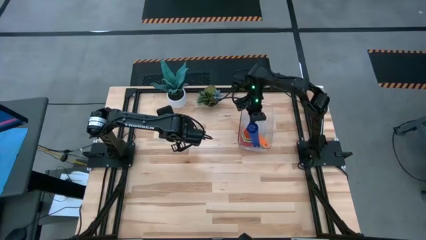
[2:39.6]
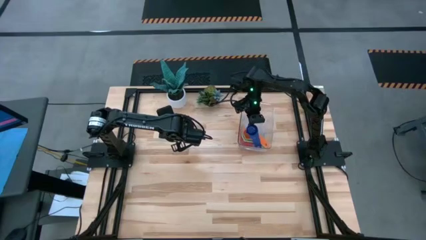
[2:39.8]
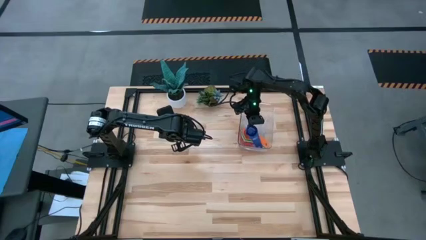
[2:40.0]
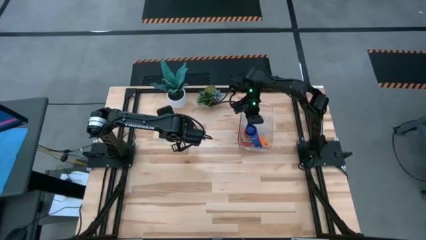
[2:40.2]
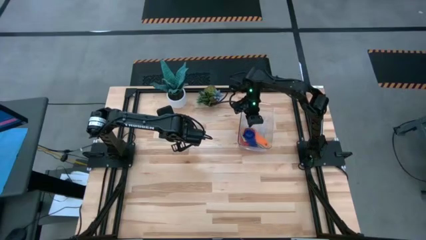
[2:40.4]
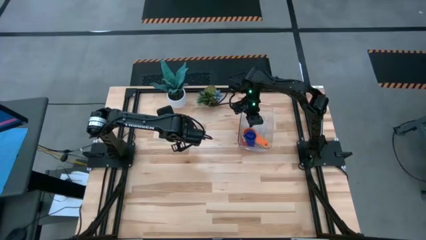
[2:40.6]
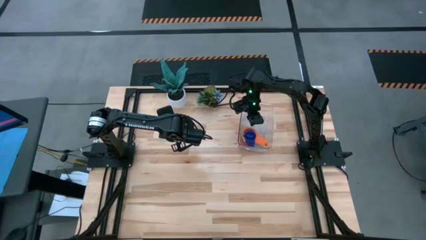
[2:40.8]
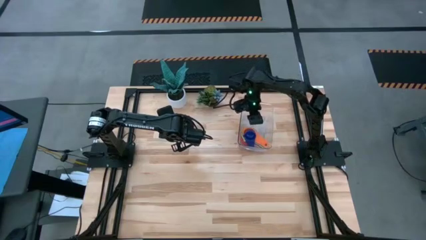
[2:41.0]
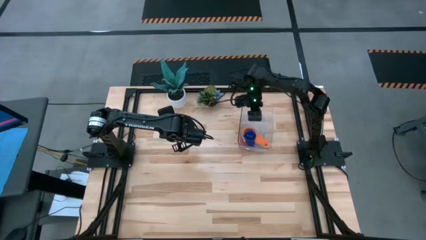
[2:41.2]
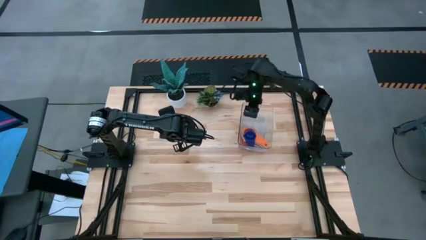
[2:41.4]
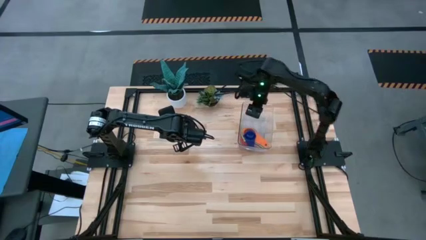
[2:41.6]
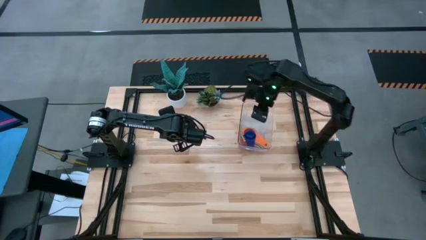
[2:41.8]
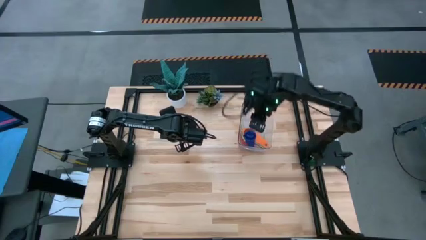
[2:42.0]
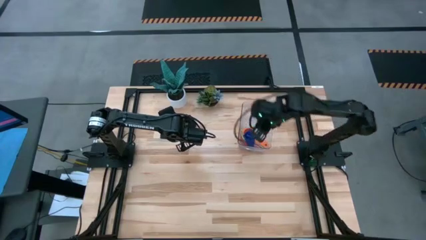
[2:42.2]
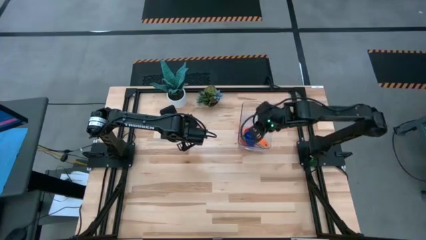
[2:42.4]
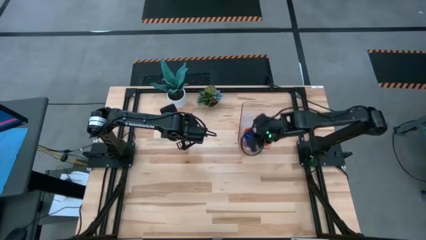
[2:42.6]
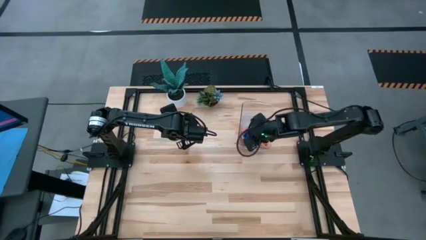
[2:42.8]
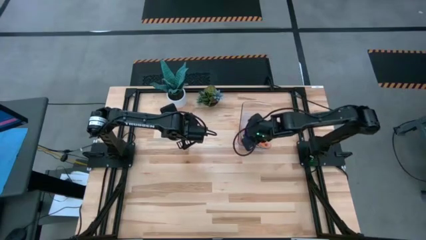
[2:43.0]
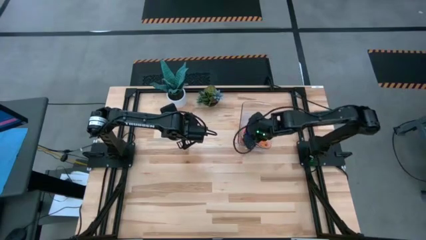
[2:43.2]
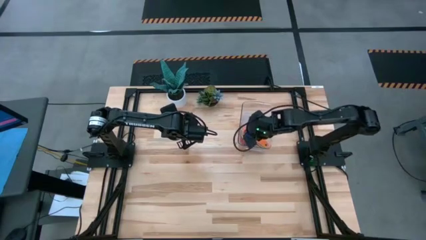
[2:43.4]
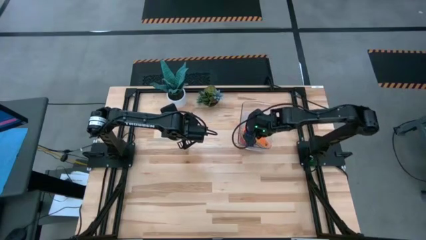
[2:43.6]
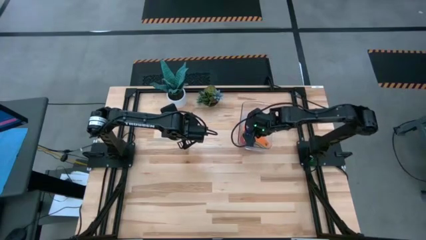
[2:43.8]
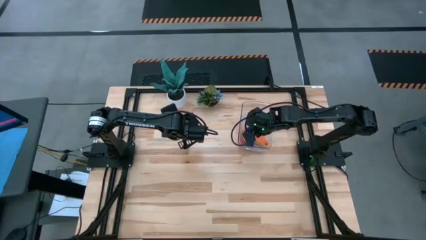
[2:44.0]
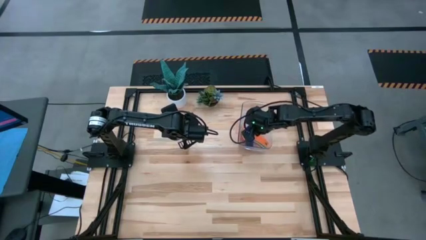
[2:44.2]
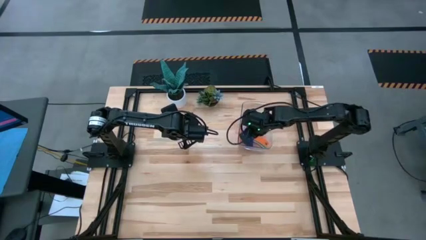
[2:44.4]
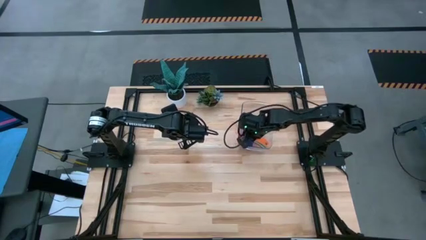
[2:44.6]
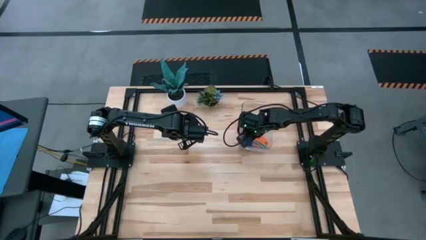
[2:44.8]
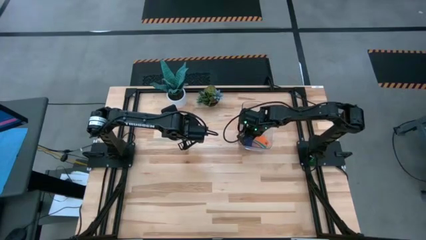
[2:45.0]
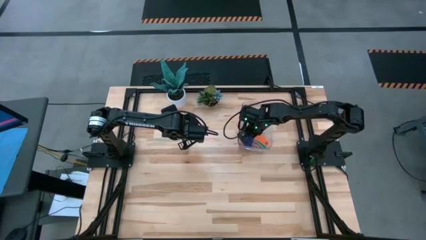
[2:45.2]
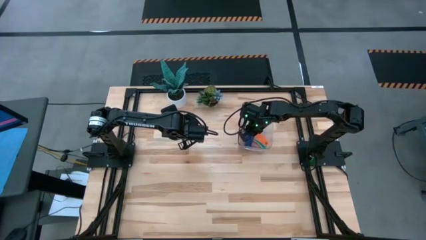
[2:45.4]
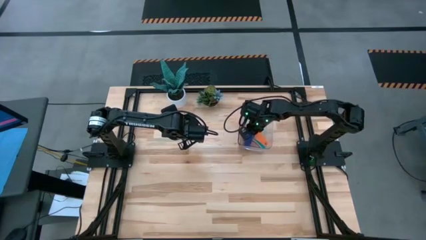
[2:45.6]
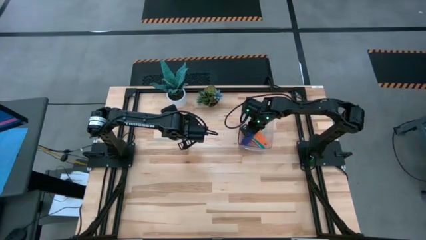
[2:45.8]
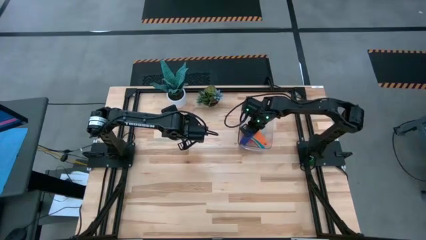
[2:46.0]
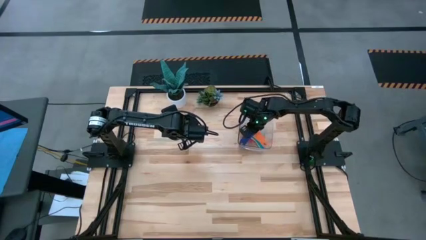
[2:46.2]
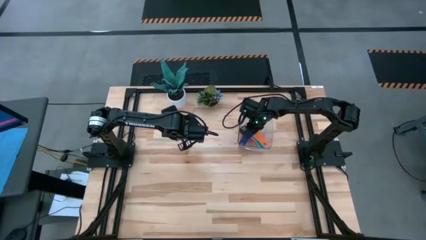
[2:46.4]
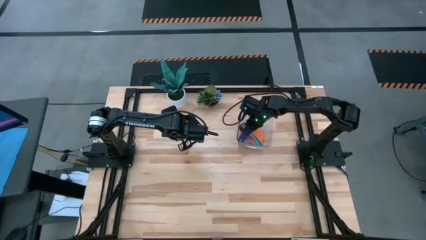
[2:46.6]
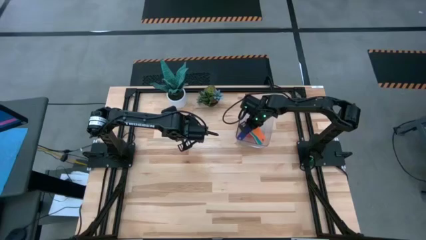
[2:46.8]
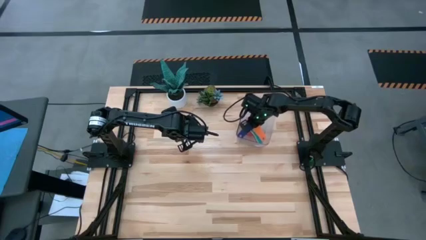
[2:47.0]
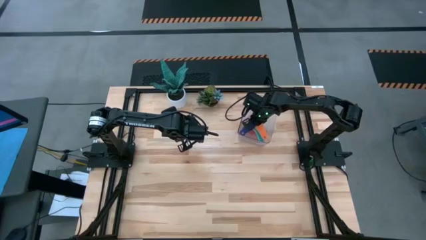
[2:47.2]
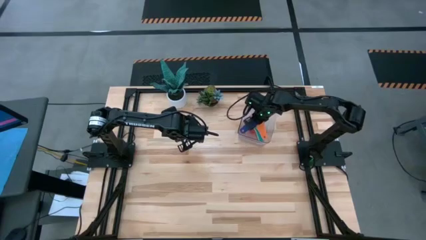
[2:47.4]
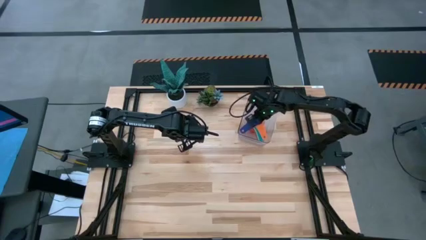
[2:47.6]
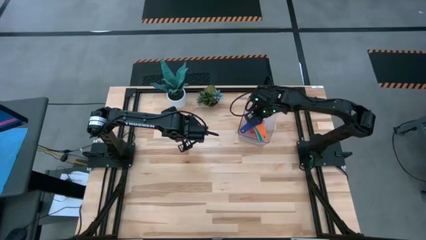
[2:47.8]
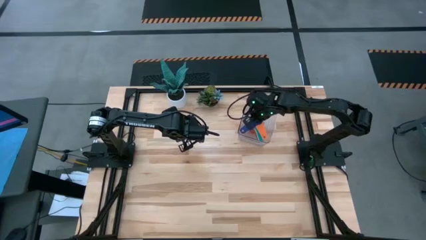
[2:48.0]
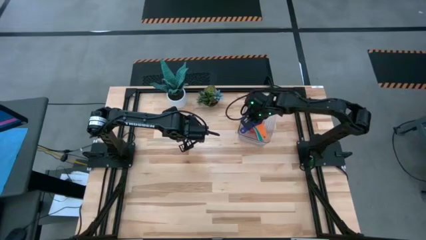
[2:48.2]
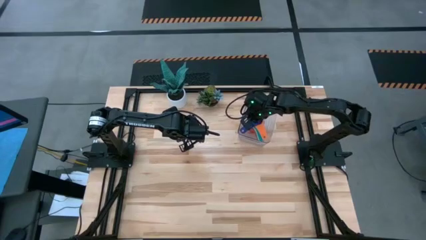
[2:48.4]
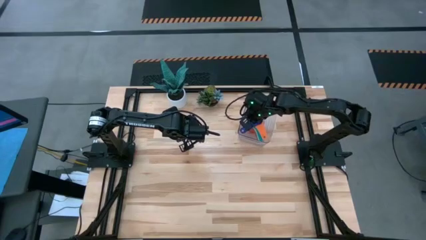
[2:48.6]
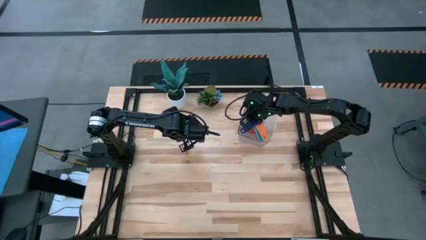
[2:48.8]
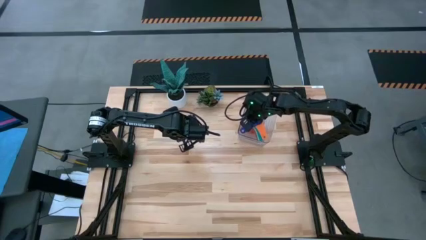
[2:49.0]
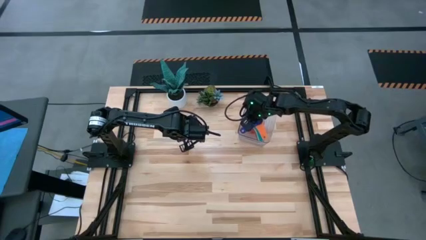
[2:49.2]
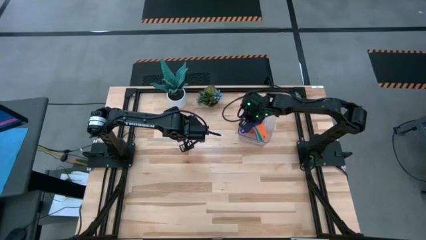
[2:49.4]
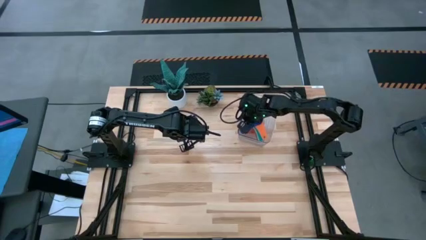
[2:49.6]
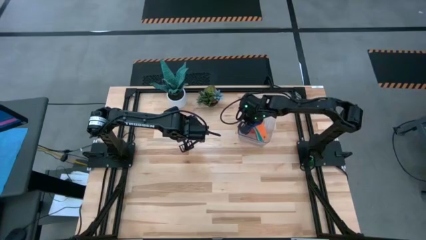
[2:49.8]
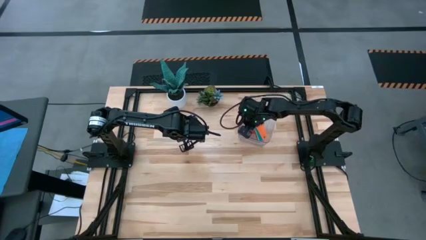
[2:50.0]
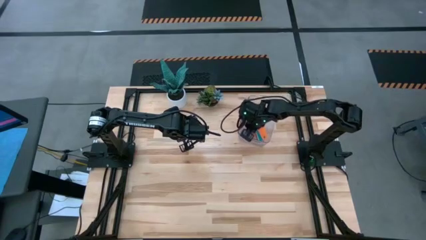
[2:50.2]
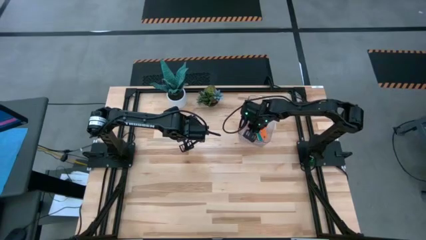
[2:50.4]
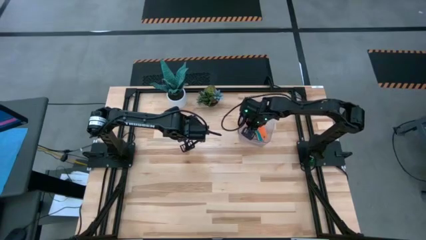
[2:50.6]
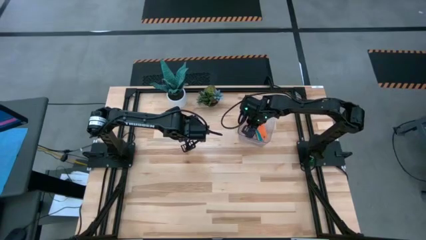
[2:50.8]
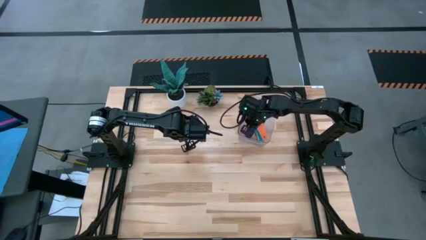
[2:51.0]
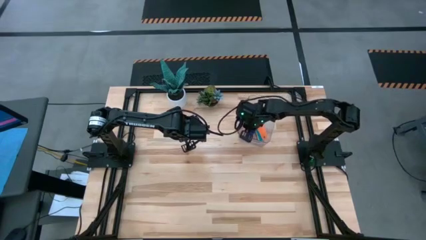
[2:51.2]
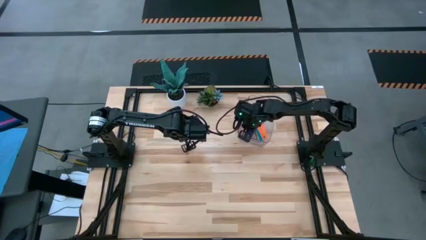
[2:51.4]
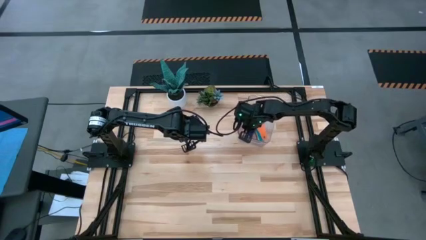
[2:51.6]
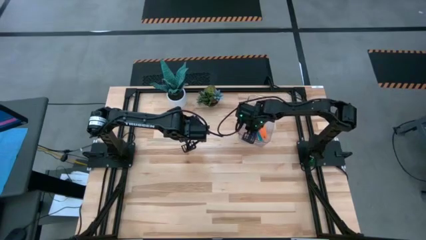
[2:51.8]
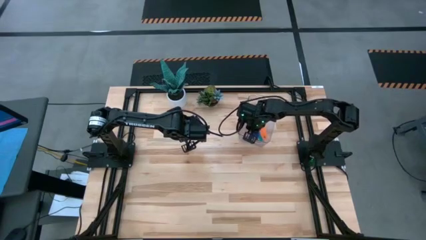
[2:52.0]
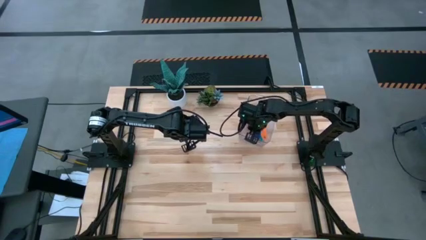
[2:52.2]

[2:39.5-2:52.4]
Task: Nest measuring cups in basket
Adjust the nested measuring cups in the transparent bin

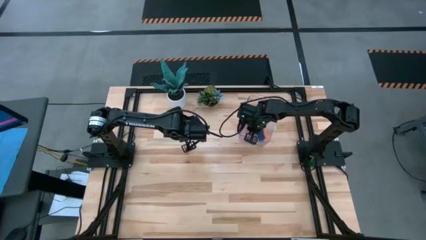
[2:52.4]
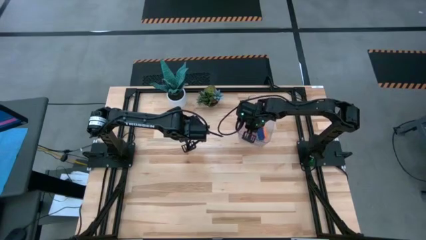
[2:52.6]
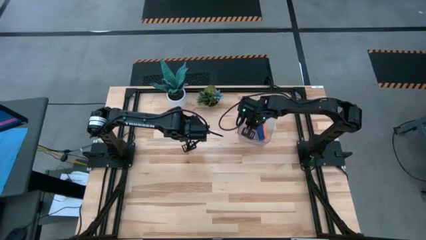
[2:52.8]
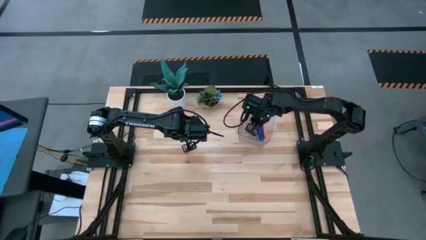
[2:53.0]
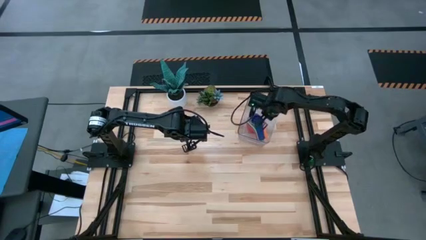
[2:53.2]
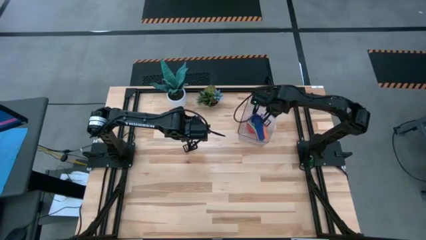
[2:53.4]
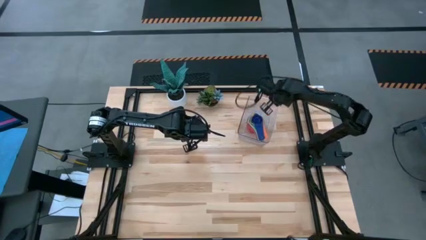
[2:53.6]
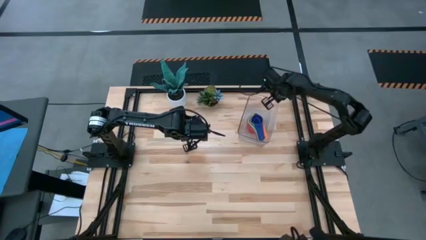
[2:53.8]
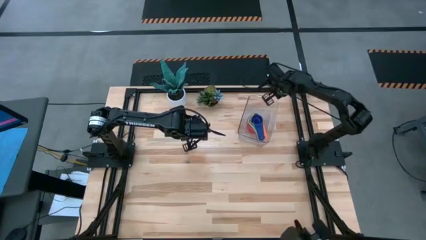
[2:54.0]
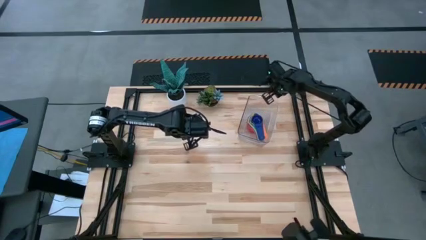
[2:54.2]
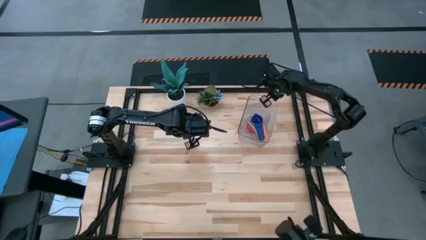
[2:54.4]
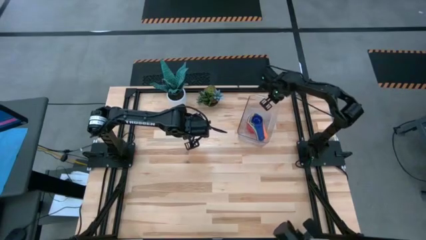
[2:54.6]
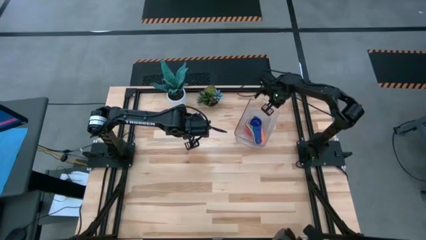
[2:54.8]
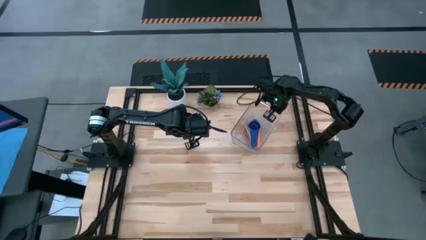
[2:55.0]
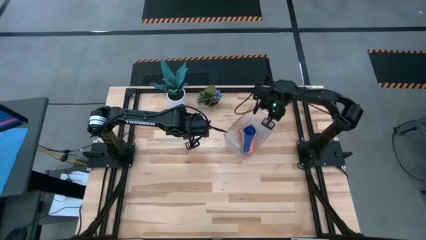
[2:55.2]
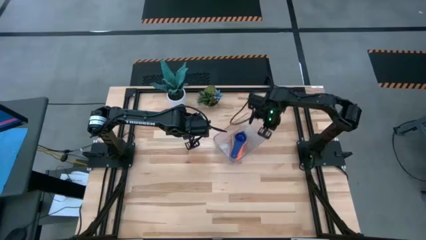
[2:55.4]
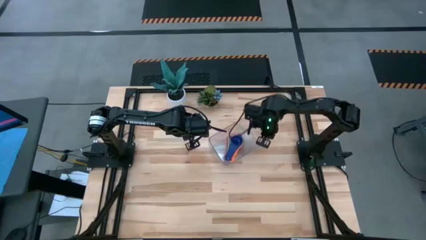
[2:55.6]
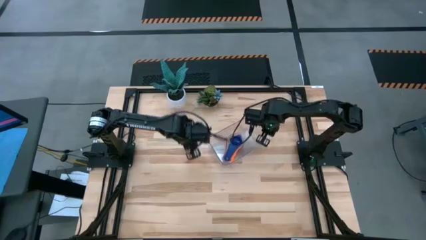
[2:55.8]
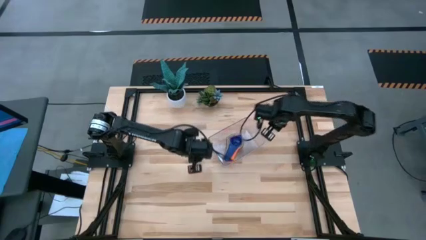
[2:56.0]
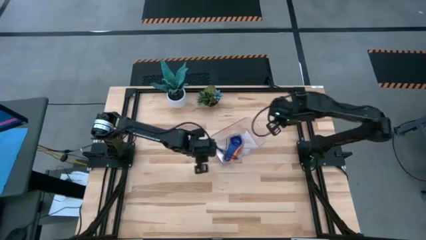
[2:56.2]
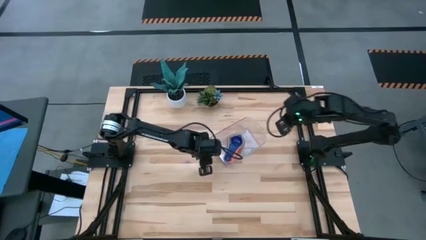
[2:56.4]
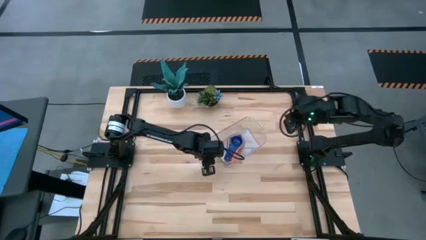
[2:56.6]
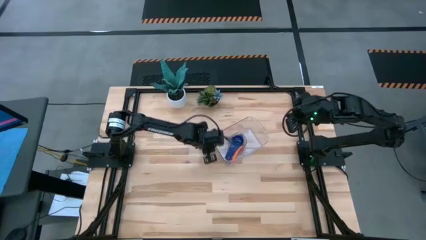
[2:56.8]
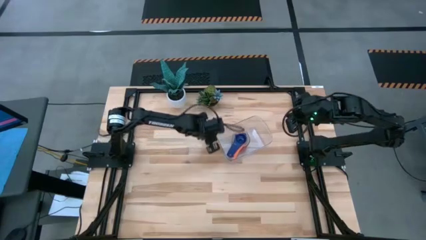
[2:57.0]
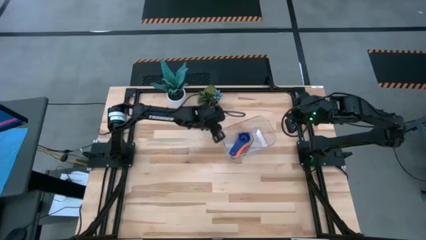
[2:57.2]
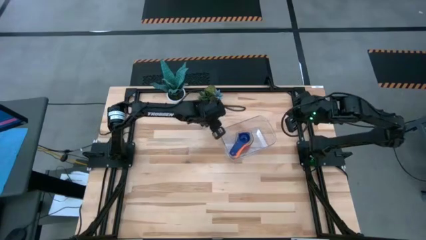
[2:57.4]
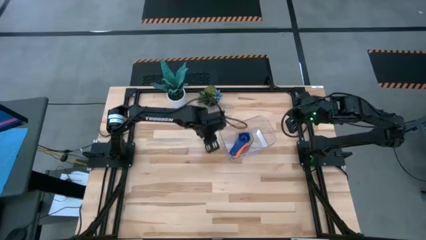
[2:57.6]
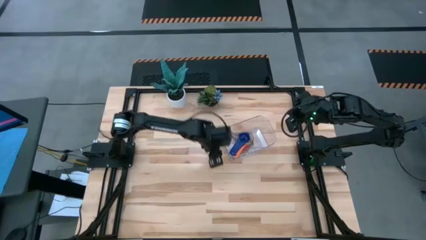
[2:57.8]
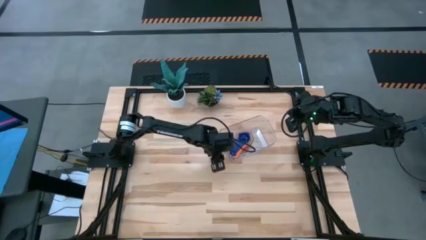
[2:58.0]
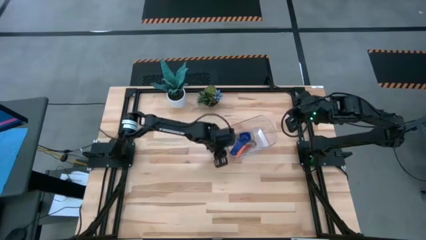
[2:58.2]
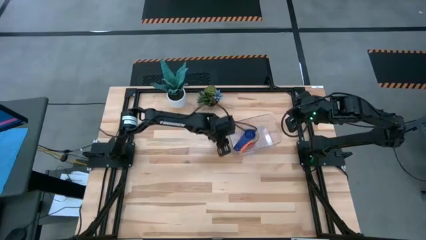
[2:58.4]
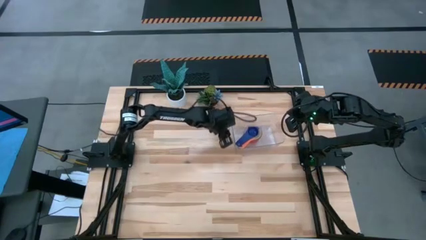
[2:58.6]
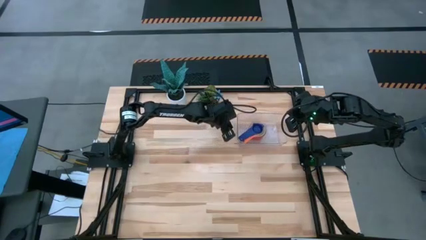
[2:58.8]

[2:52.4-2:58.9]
Adjust the transparent bin
